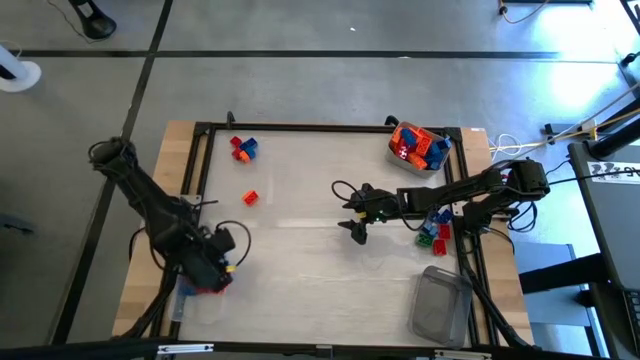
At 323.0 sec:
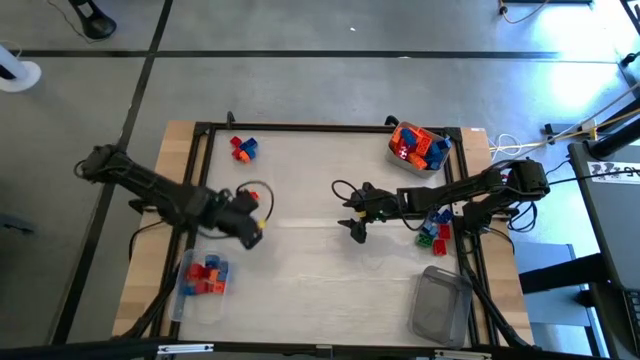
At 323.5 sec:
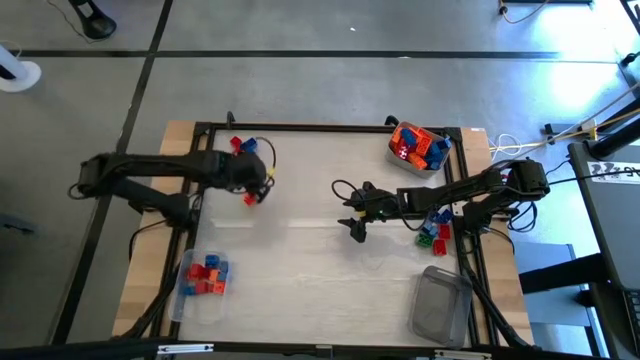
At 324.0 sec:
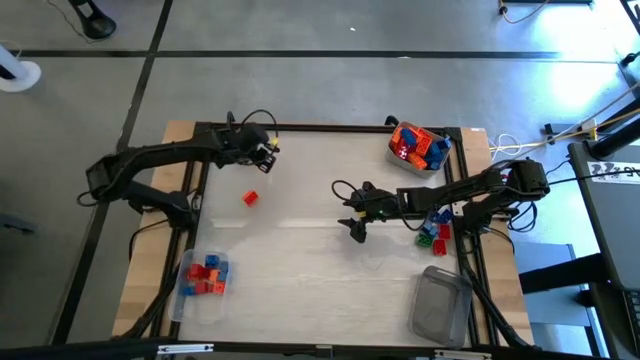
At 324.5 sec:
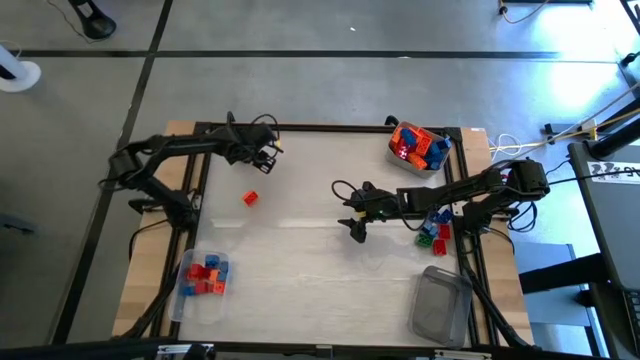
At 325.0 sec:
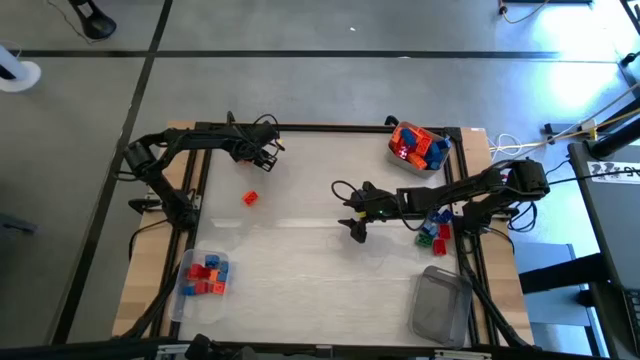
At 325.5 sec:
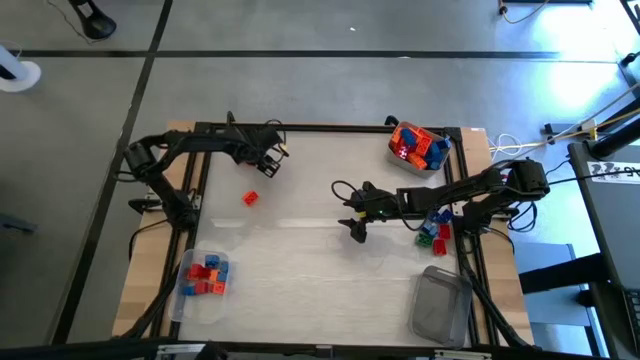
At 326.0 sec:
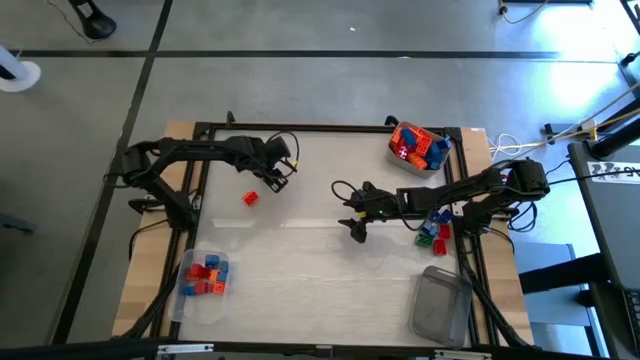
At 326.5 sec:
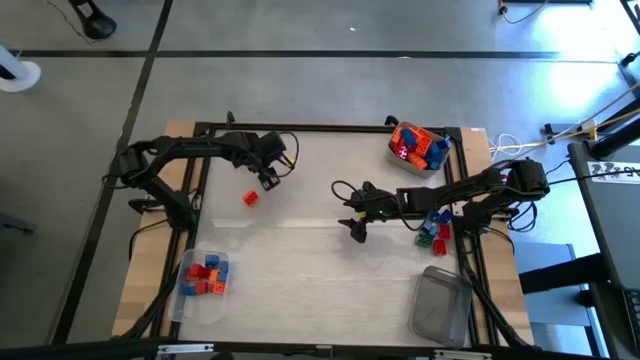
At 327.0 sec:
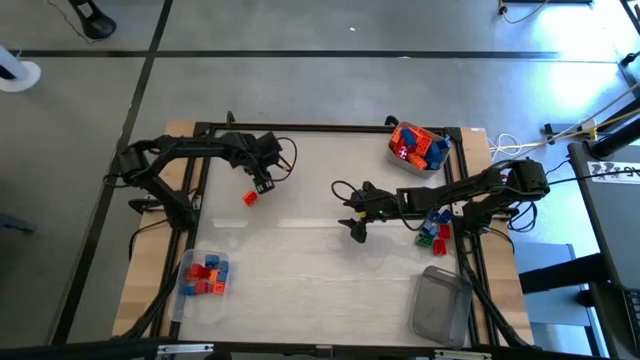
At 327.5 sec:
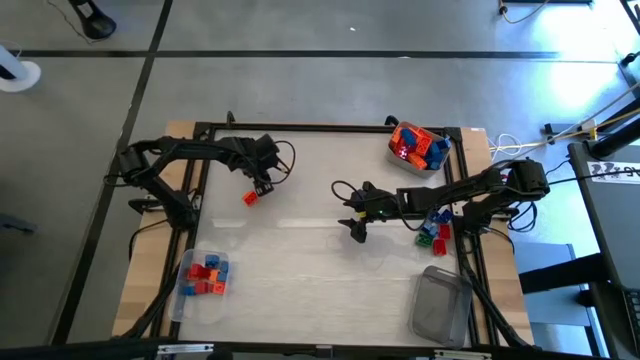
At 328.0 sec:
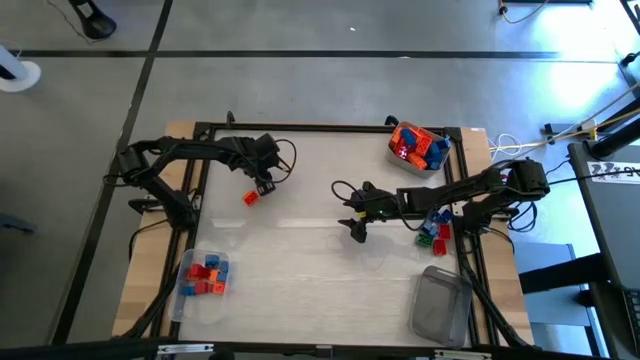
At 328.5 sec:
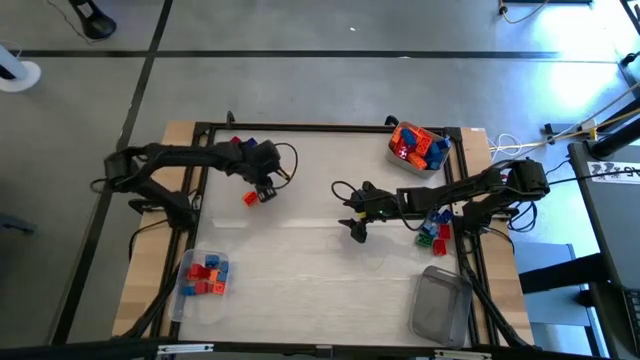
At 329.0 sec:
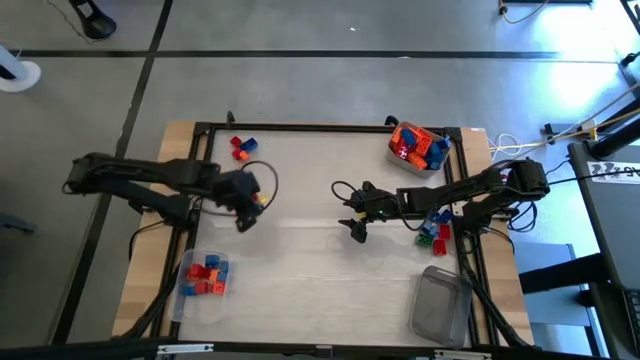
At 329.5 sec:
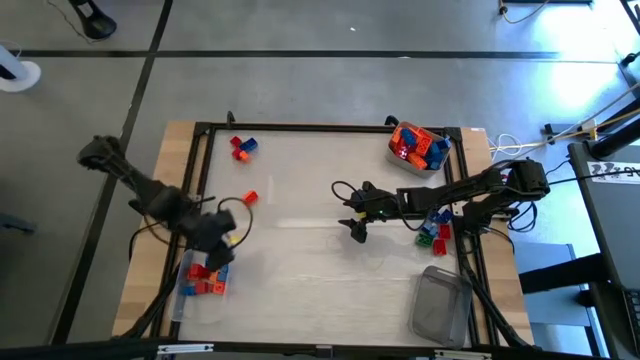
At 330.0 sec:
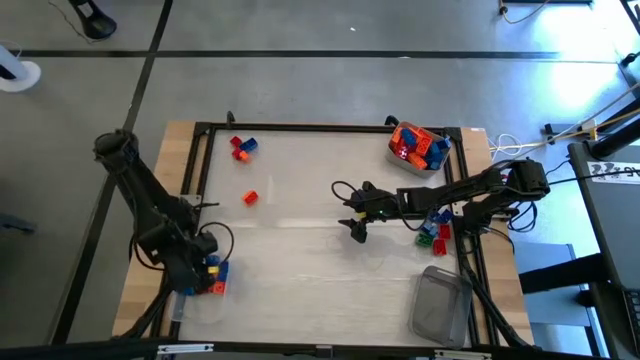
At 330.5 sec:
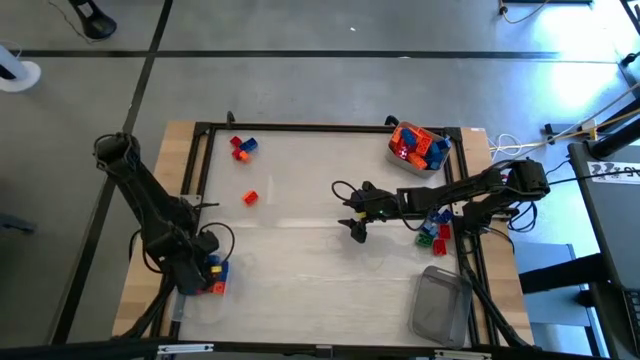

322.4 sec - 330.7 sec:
Task: Sort blocks by size
Put the blue game piece into the transparent bin

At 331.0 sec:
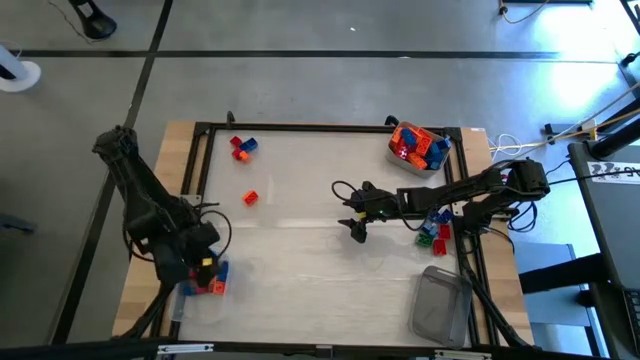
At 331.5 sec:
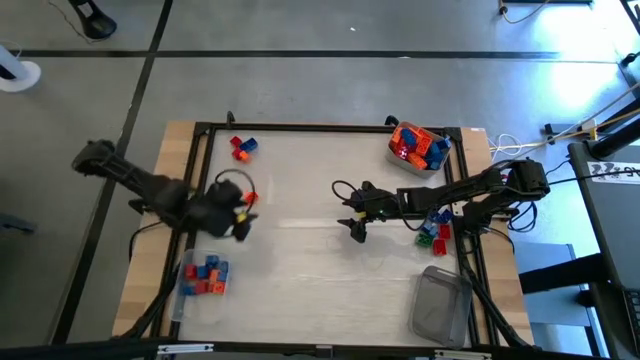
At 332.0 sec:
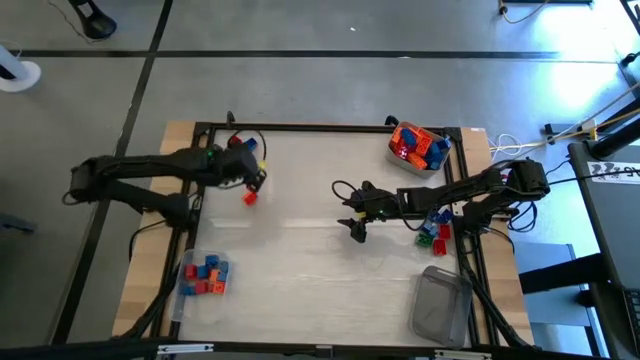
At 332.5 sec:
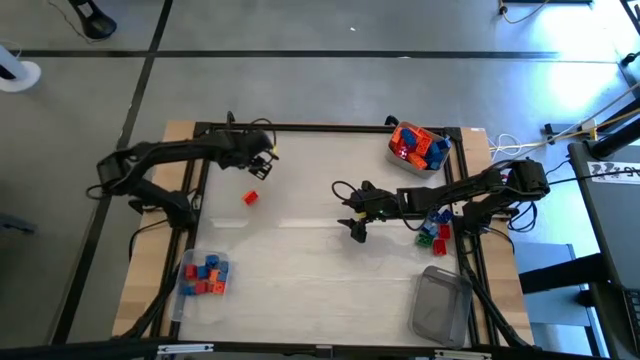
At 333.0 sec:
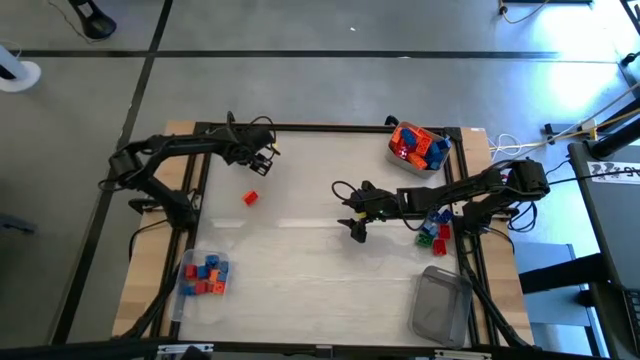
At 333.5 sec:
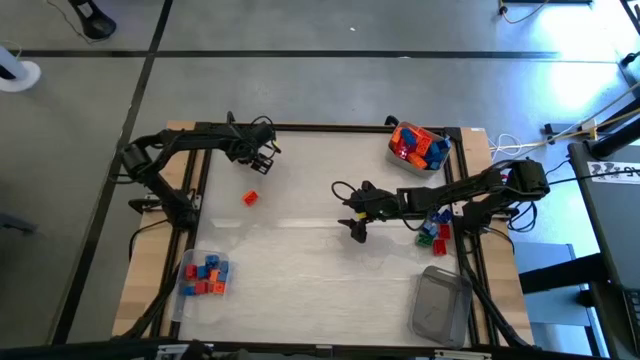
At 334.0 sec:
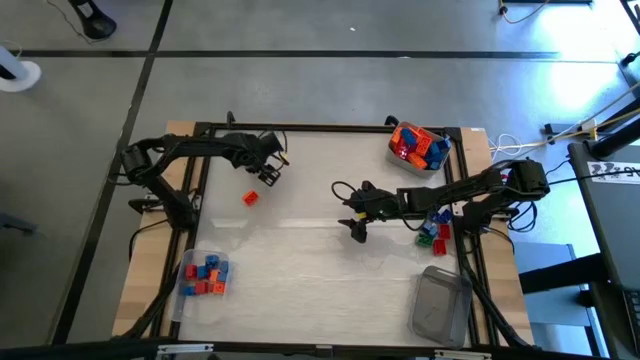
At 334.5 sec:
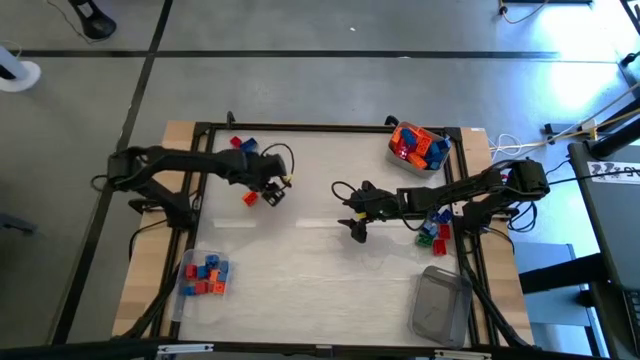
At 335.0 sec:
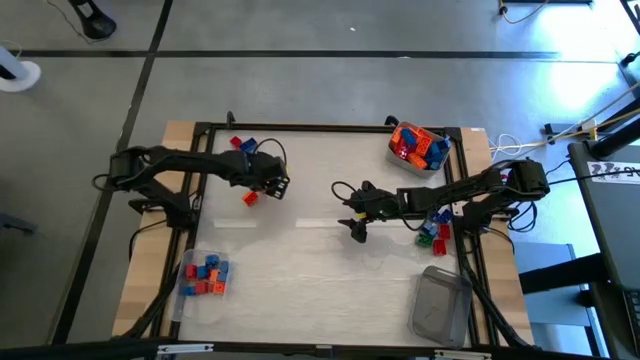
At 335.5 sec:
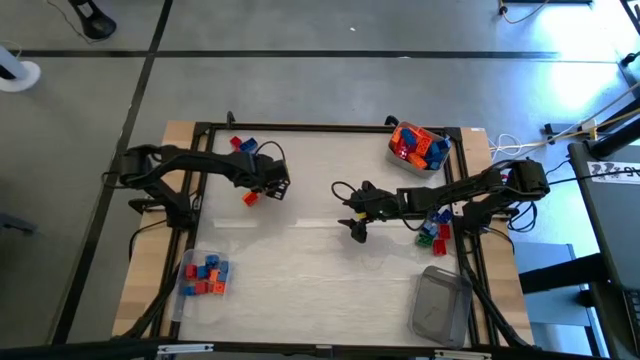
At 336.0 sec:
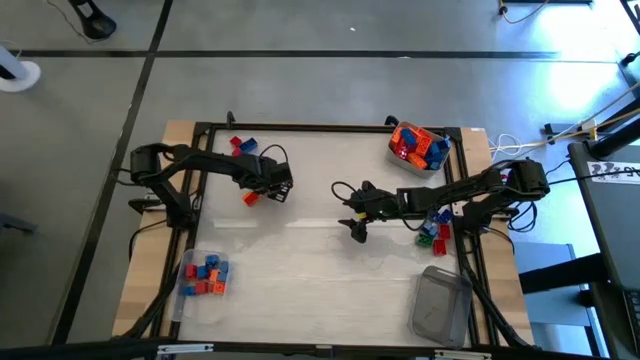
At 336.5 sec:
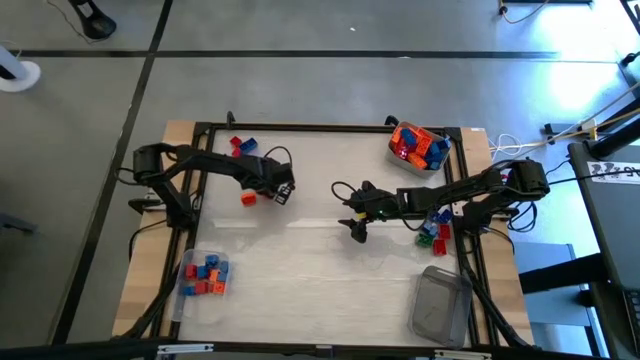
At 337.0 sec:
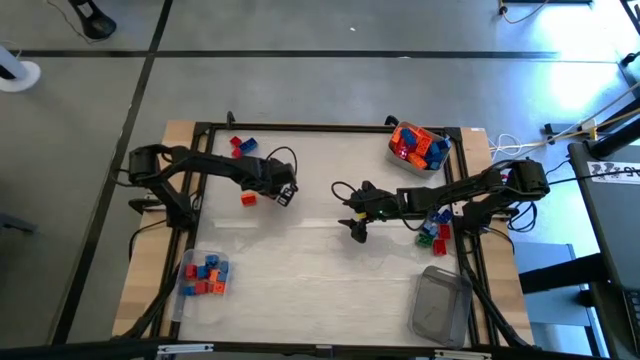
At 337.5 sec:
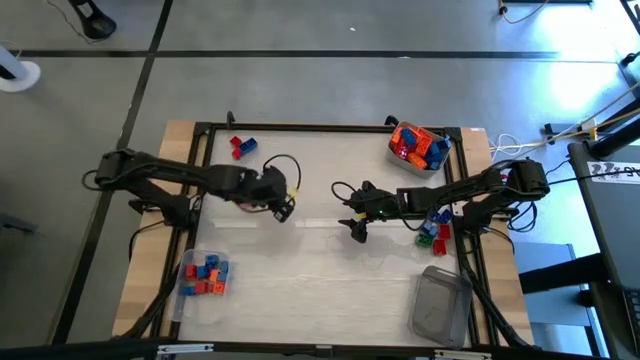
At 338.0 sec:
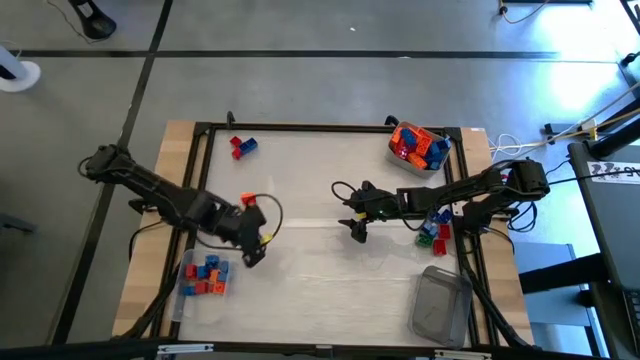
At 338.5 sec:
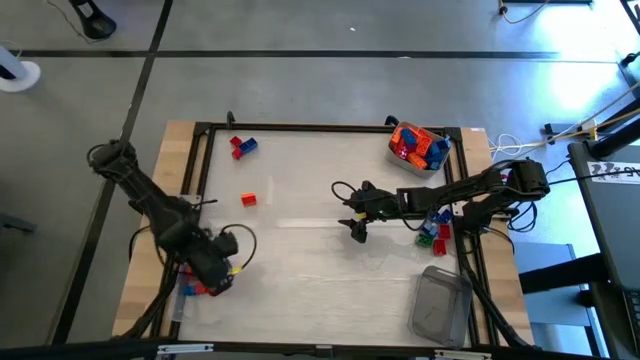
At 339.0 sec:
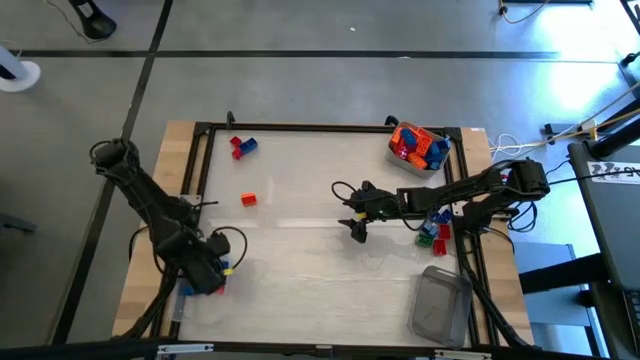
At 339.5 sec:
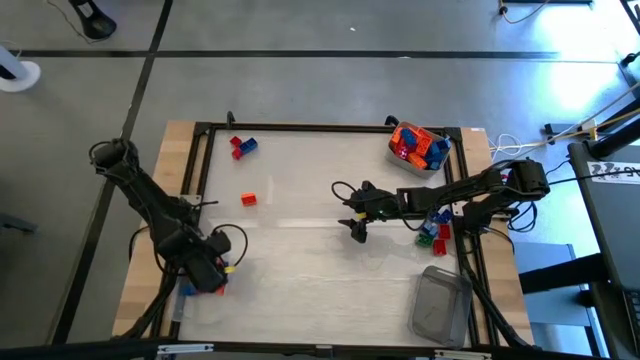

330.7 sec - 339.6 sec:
Put the orange game piece into the transparent bin

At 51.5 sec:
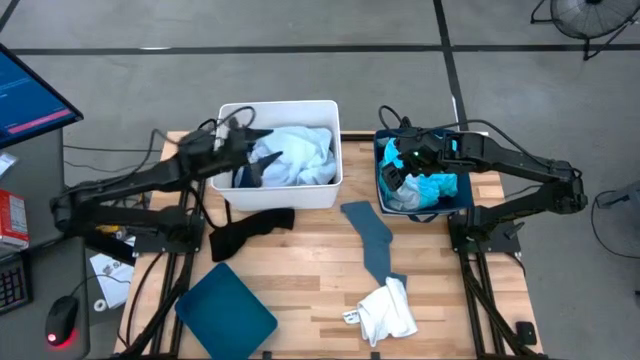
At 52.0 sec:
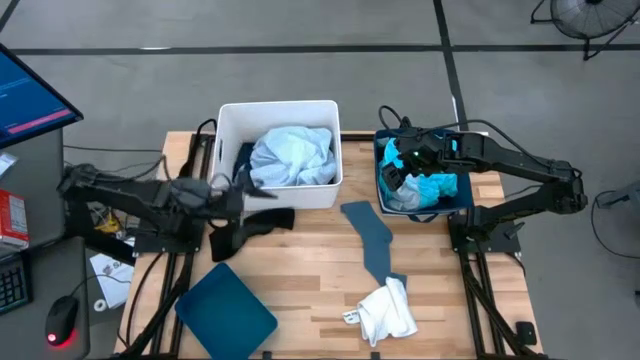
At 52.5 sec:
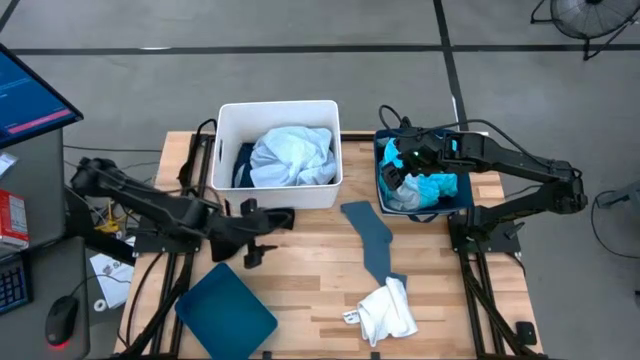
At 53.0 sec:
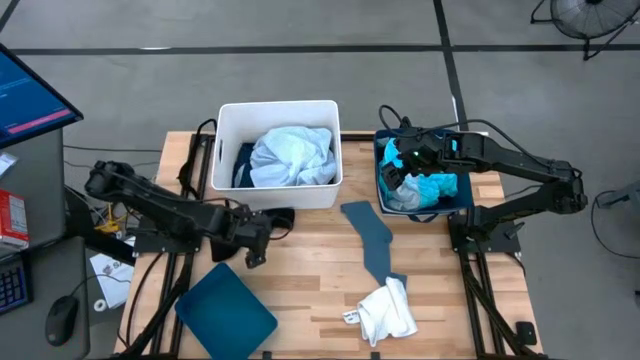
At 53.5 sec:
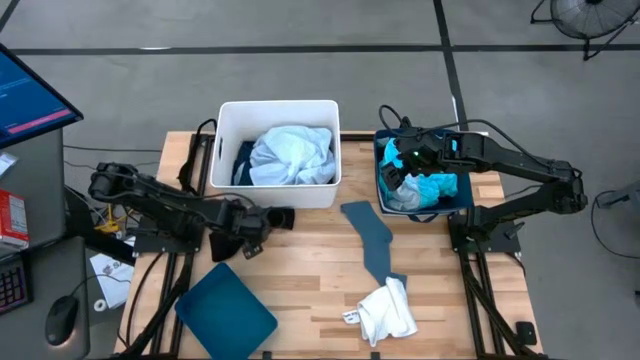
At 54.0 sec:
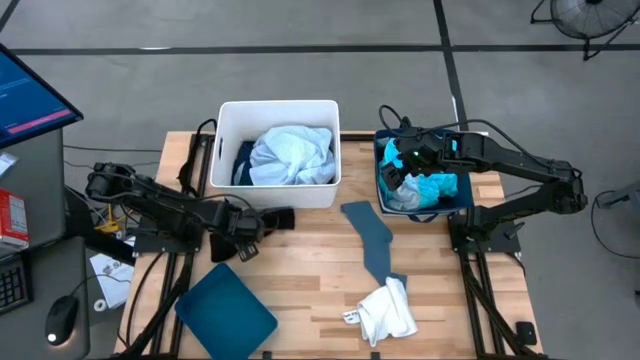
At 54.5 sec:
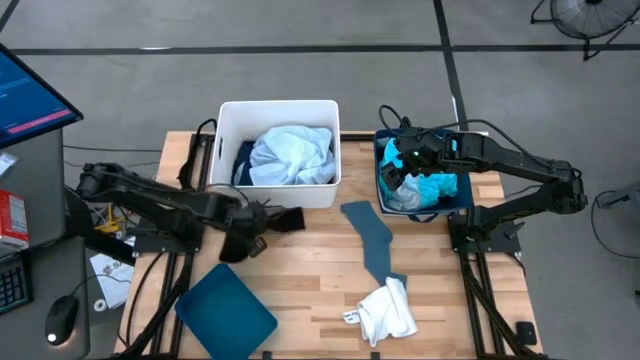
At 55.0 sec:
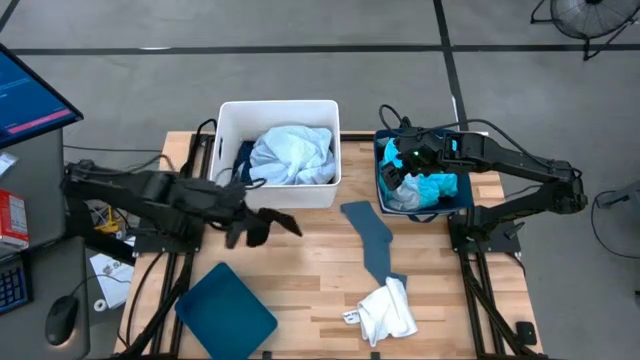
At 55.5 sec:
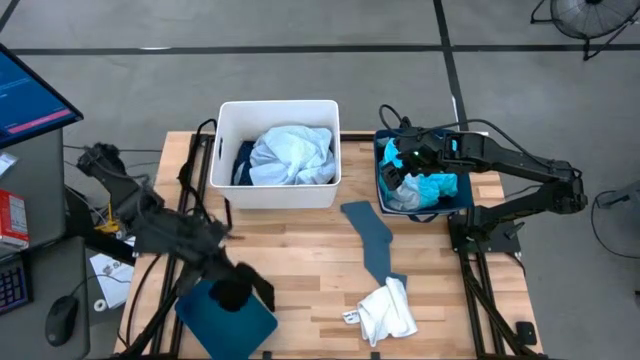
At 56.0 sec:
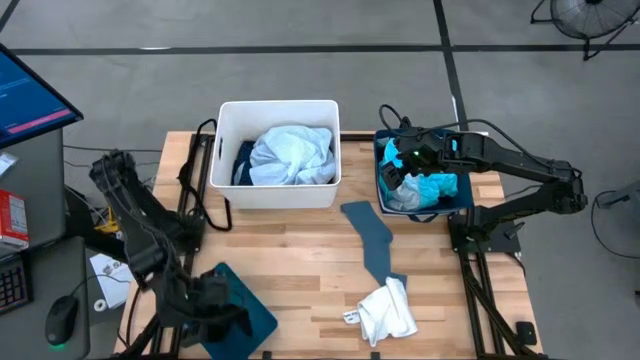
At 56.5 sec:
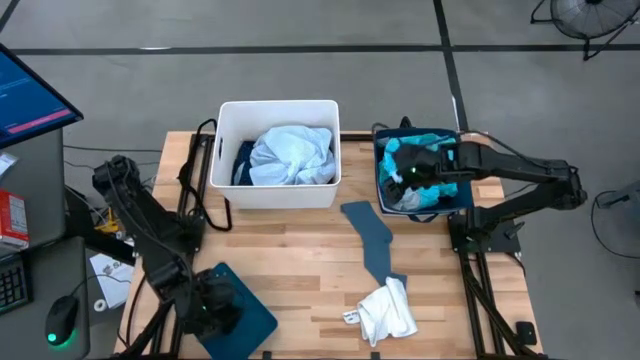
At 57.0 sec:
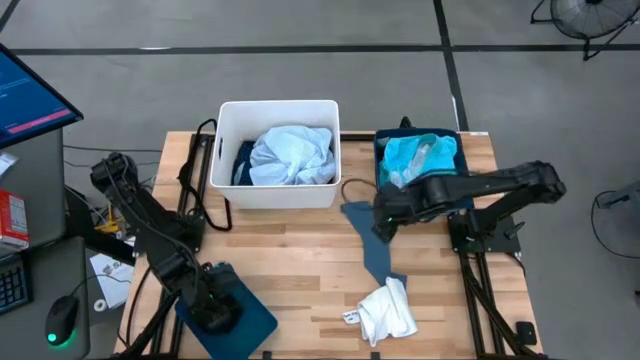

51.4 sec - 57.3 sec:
Task: Pick & Place Cloths
Put the black sock into the blue bin
